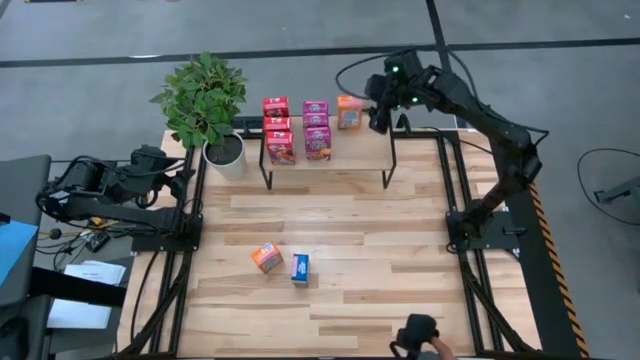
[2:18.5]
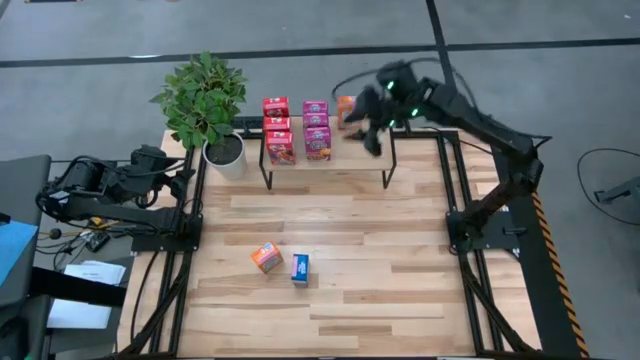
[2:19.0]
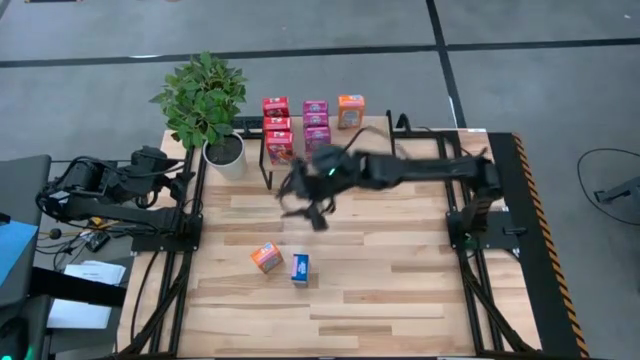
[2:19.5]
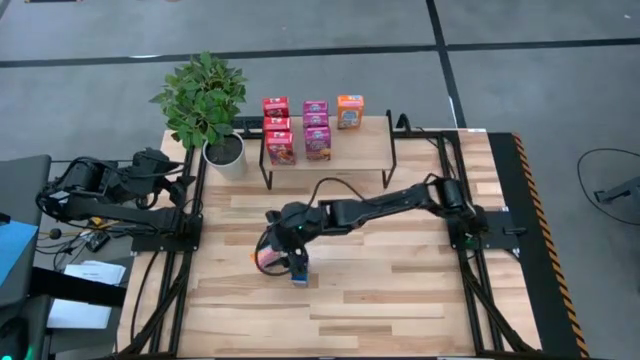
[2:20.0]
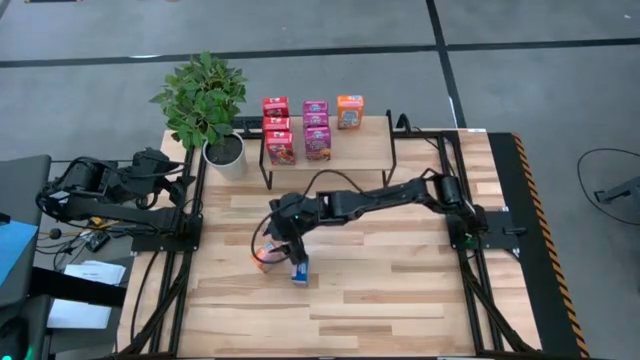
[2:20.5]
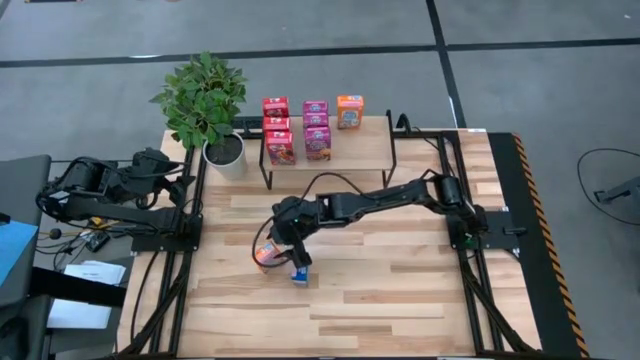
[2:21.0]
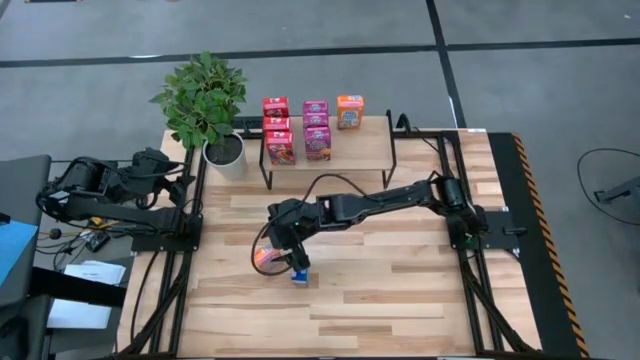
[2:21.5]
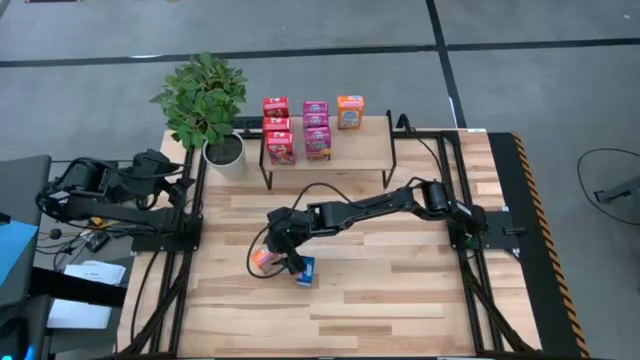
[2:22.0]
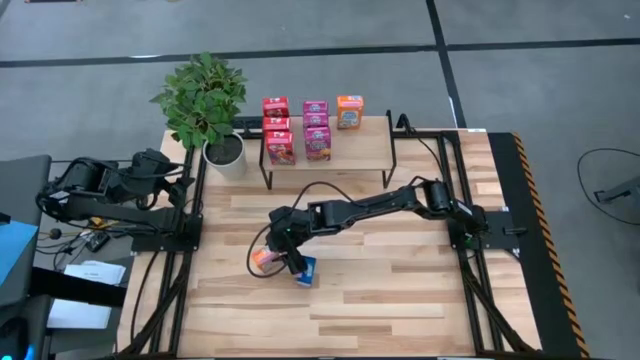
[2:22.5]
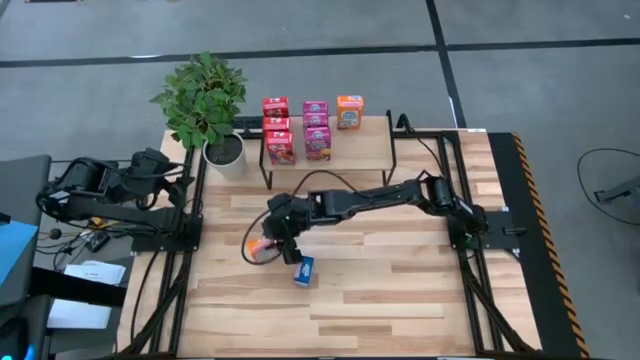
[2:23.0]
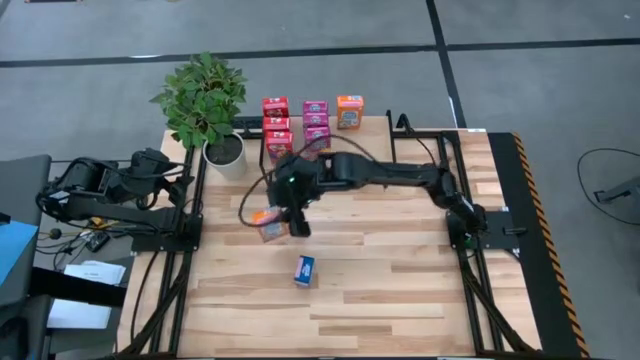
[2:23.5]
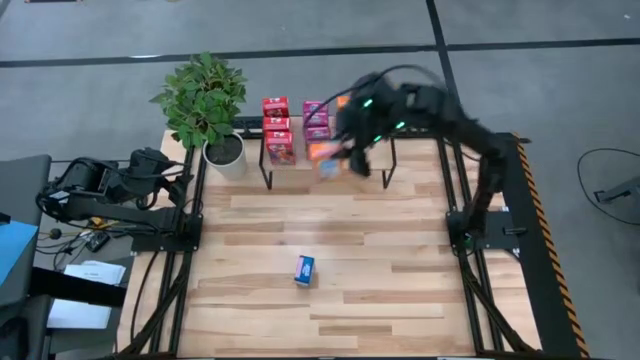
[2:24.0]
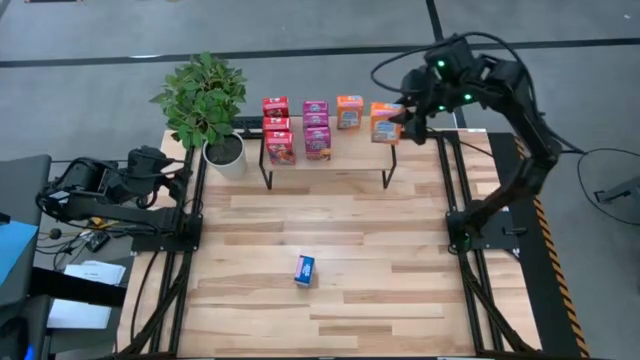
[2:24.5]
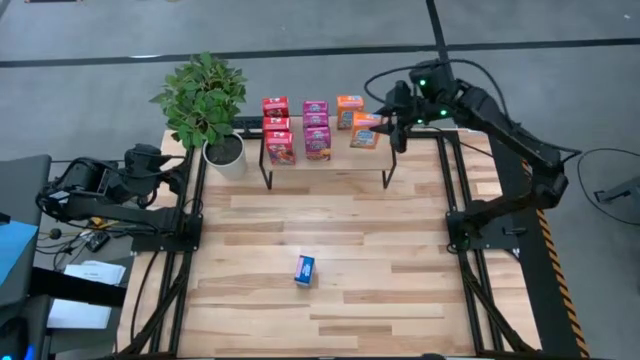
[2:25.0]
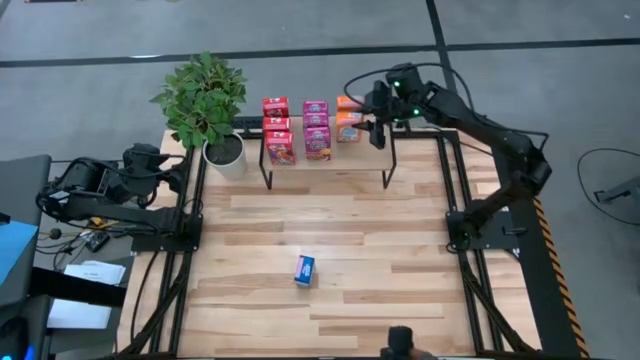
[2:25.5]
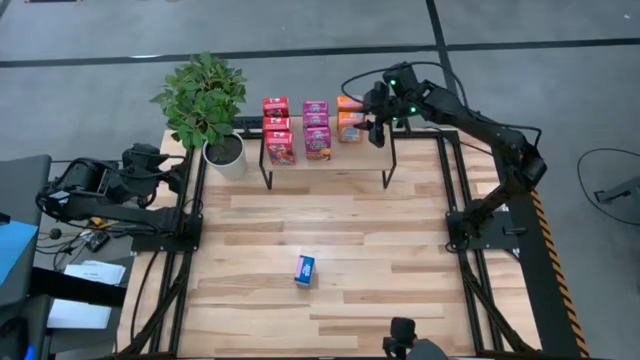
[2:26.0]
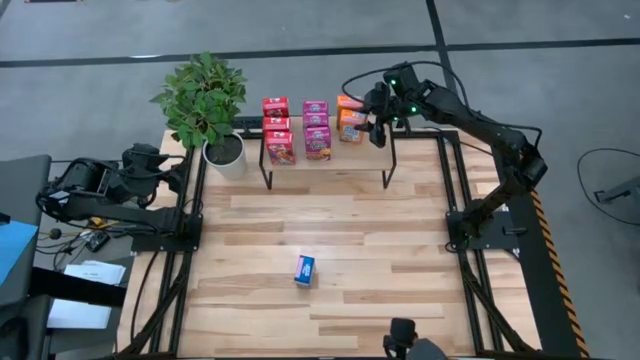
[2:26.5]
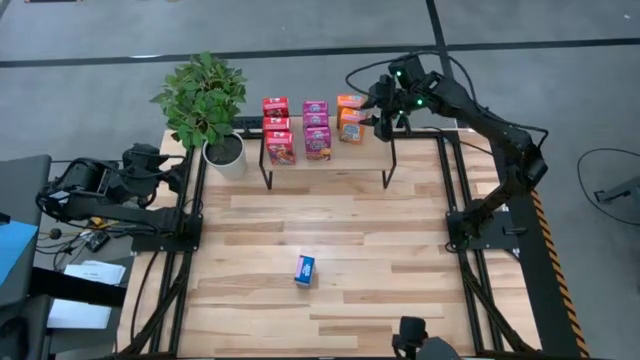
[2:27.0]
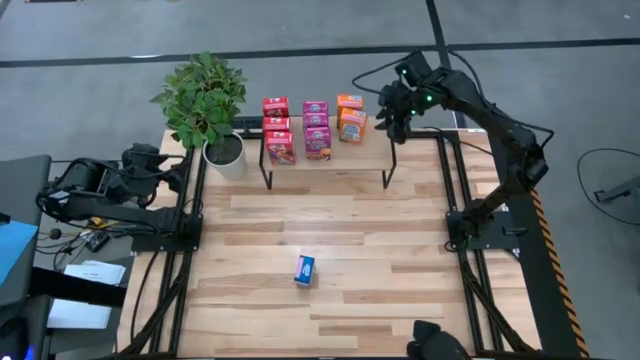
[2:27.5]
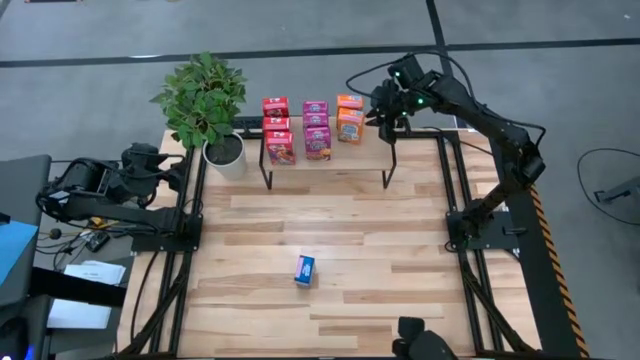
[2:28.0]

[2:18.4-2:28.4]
Task: Stack cereal on shelf
Put the orange cereal box on the shelf aligned with the other orange cereal box on the shelf

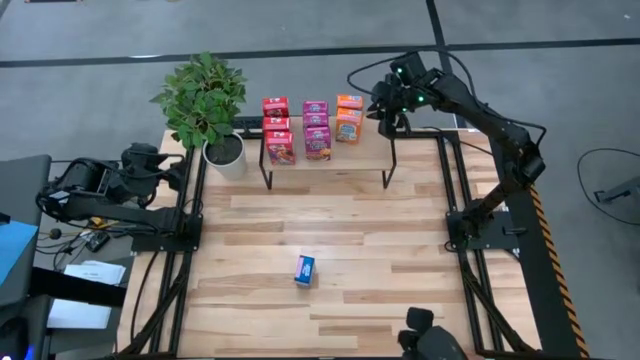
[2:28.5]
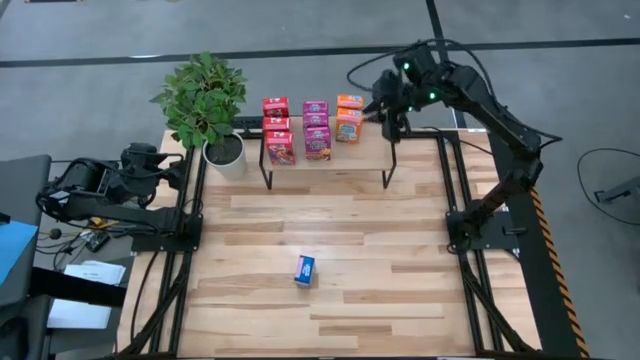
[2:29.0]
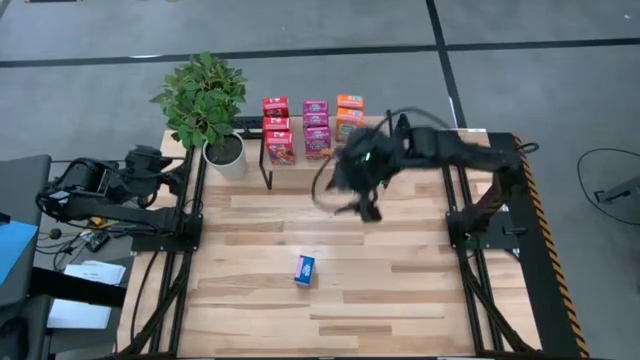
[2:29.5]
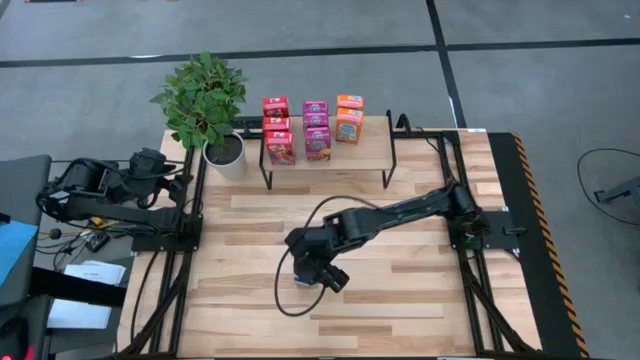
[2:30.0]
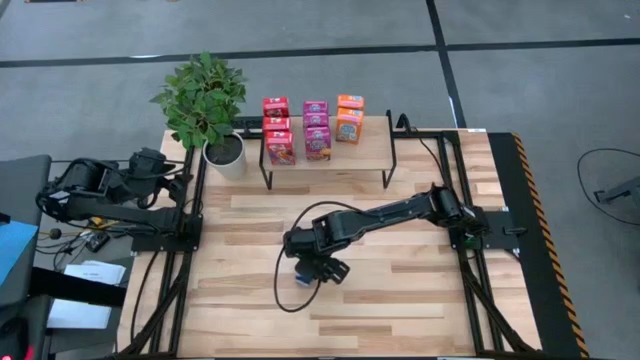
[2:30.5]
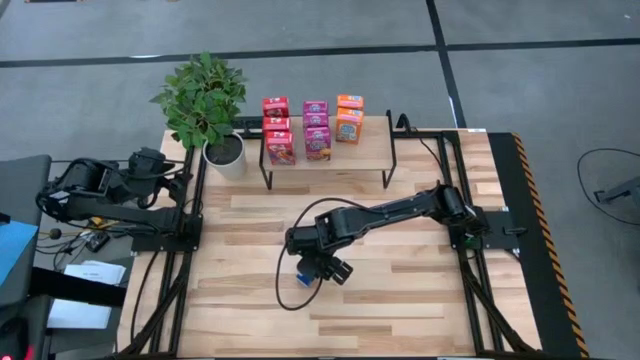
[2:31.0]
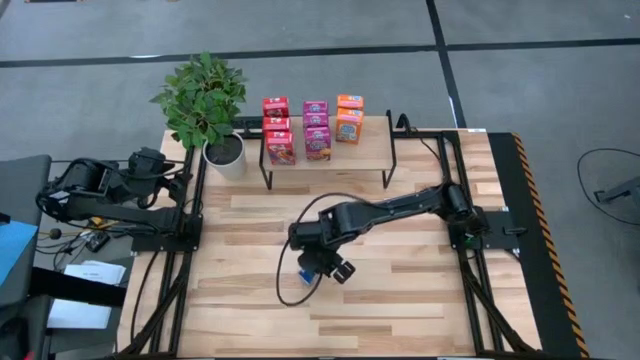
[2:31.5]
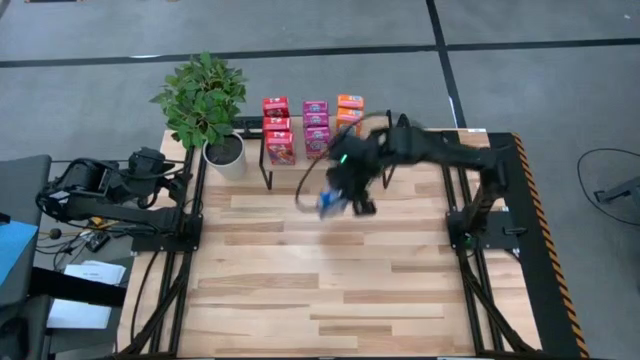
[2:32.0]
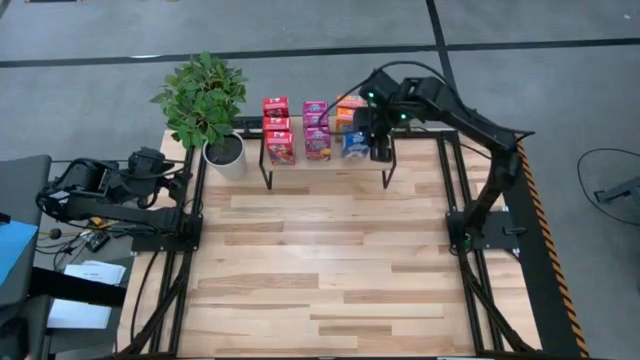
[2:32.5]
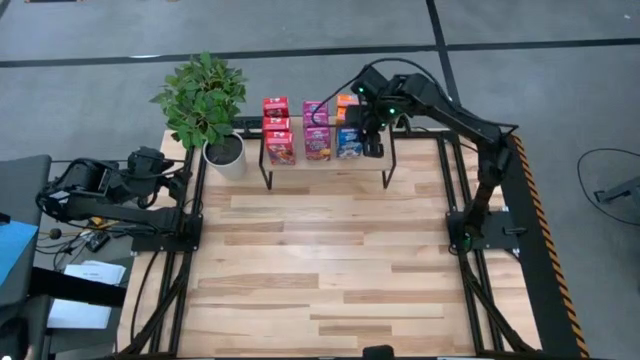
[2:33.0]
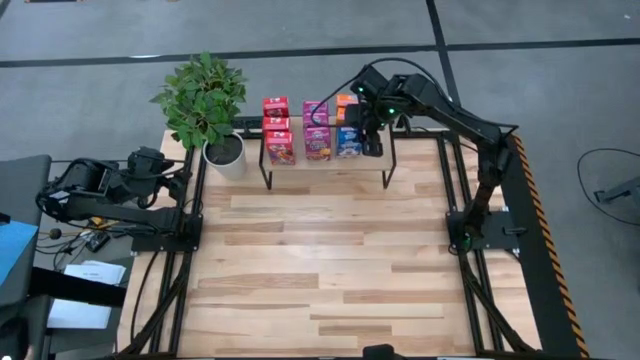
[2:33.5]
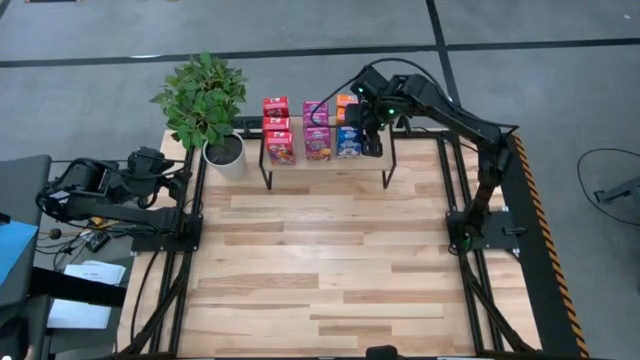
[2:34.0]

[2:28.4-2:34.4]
Put the blue cereal box on the shelf aligned with the other orange cereal box on the shelf

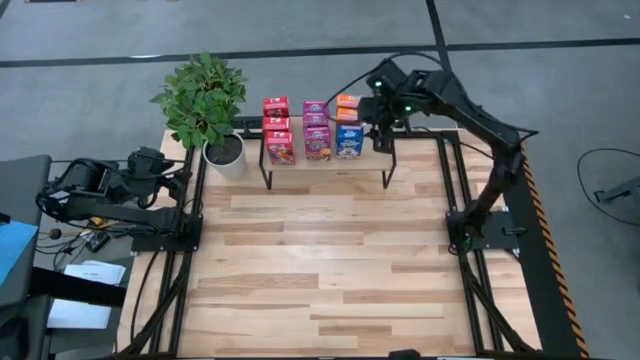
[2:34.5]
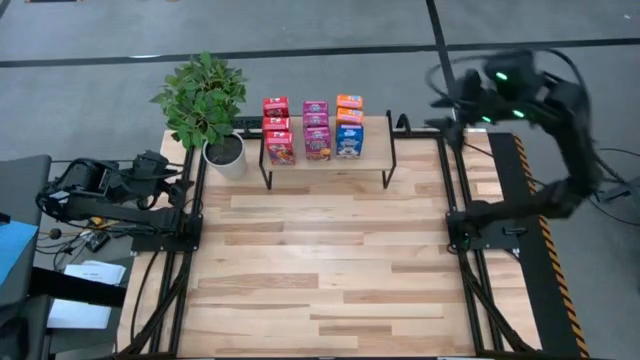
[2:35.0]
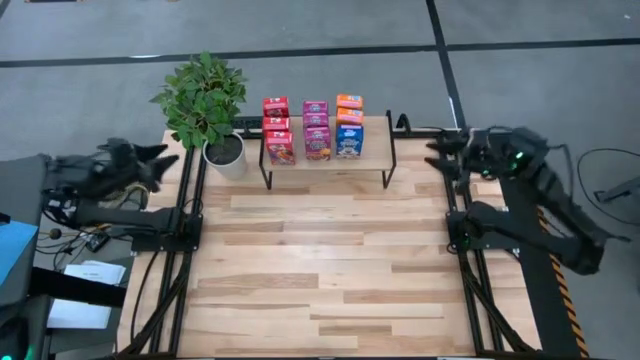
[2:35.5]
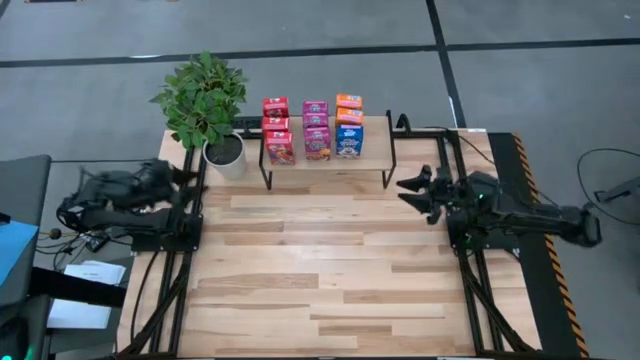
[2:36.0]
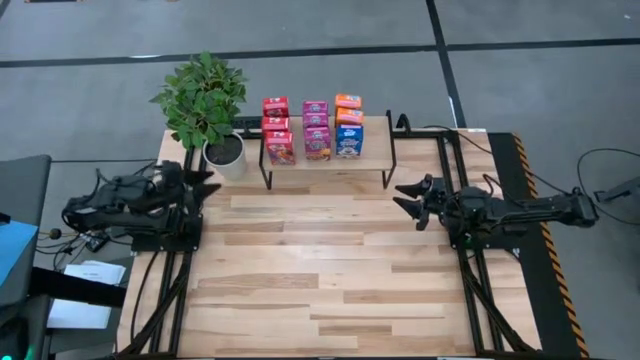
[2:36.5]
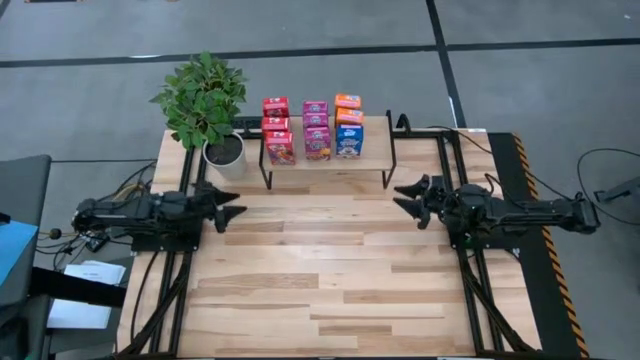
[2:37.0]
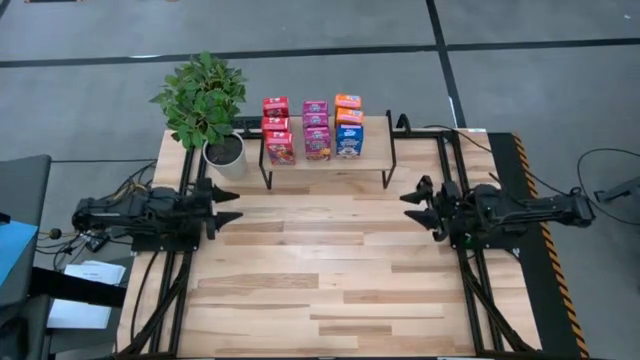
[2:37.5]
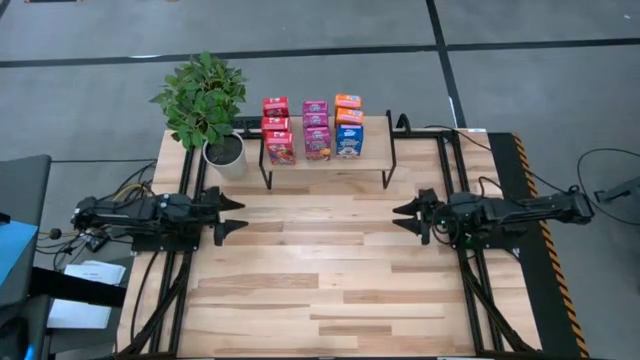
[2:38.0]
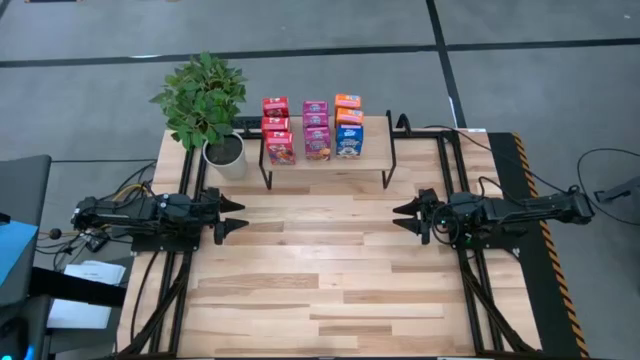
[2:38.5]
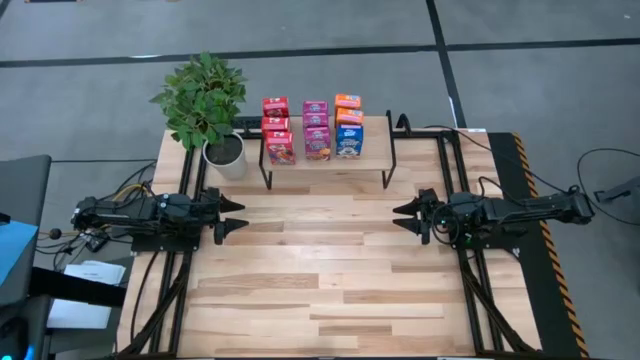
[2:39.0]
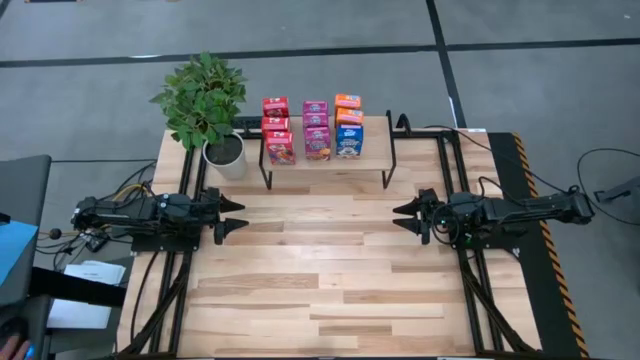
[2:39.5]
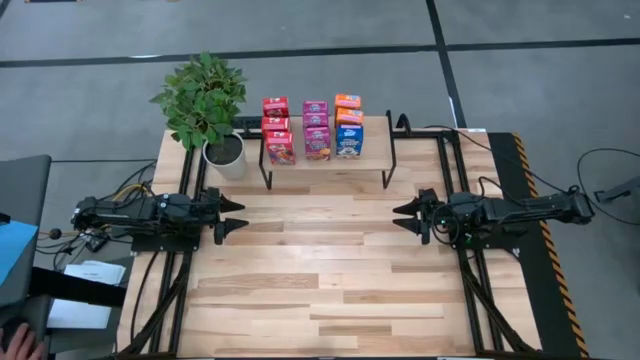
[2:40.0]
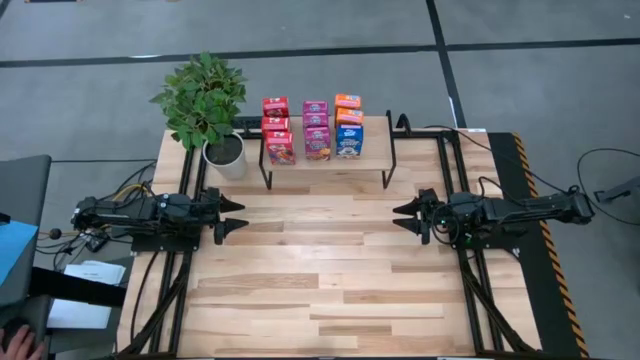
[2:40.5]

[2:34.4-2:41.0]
Return to Home Position
